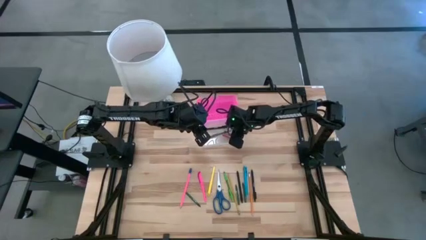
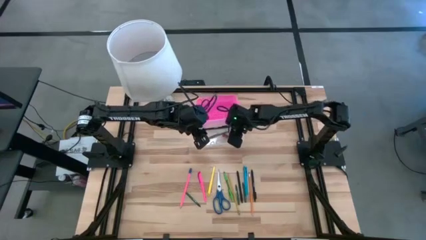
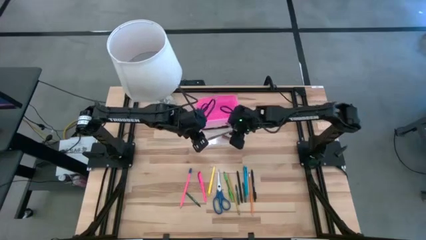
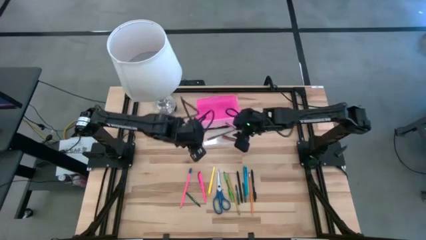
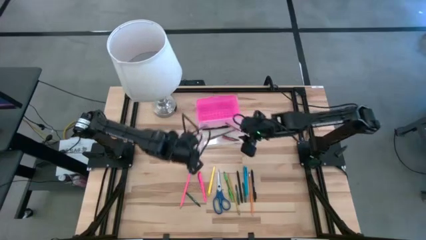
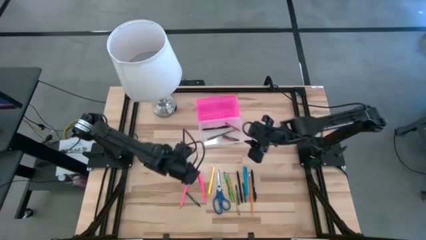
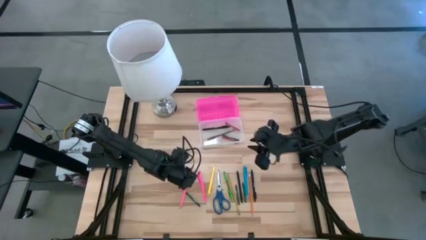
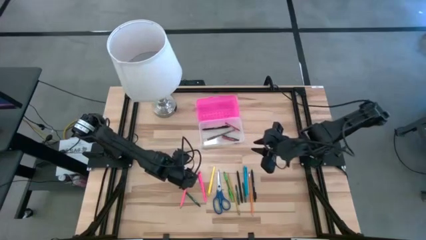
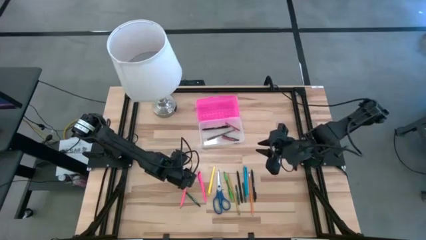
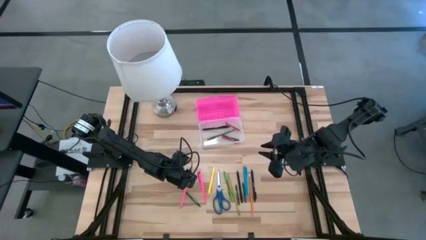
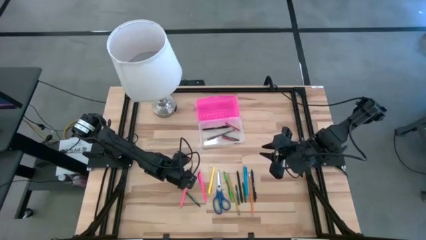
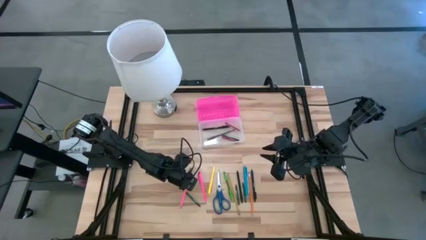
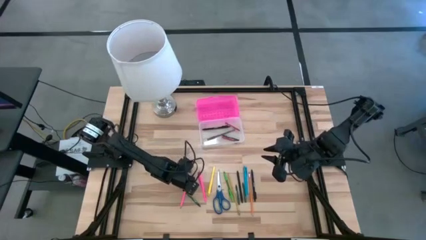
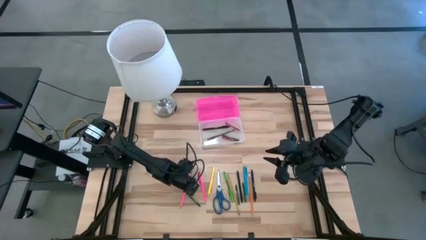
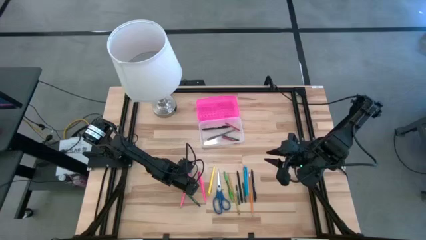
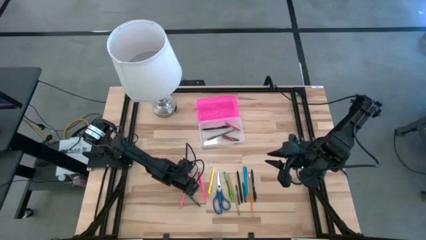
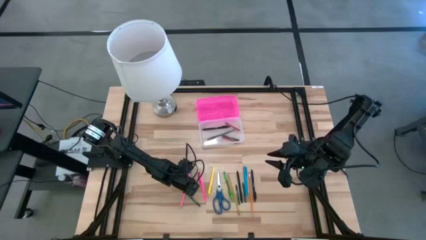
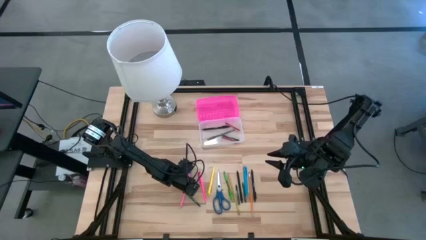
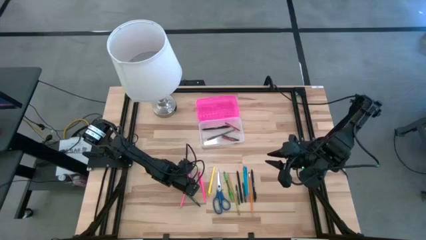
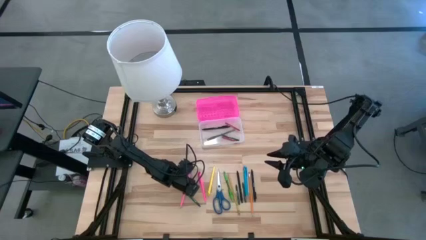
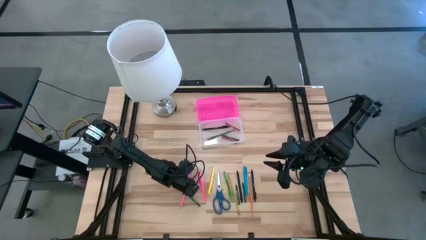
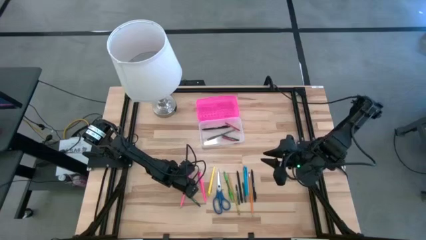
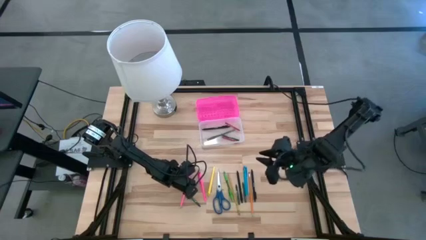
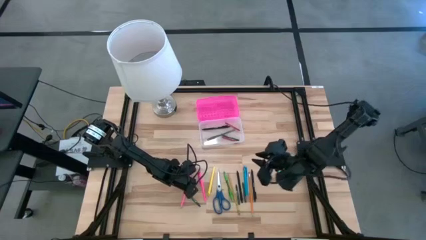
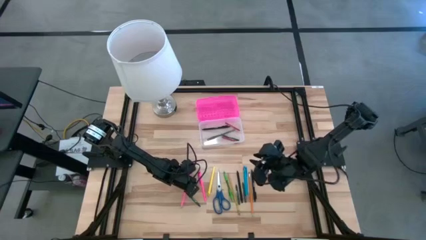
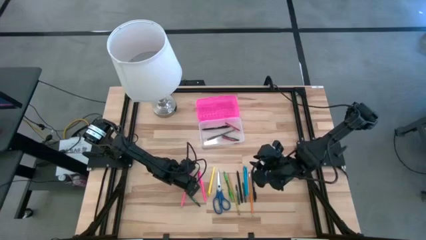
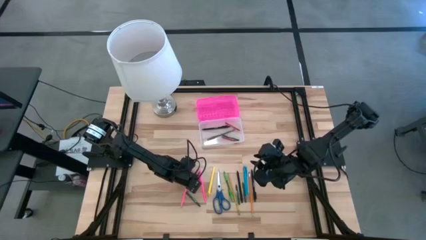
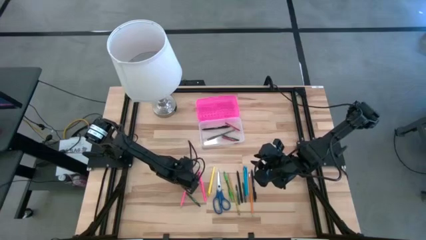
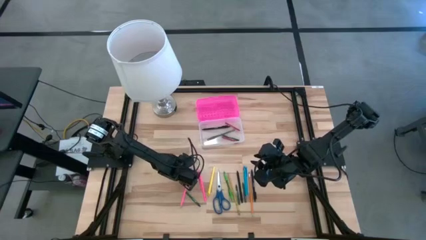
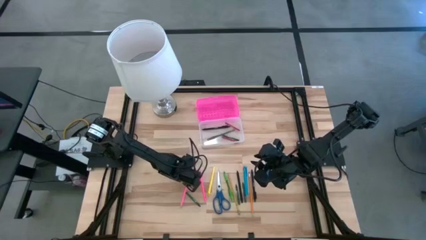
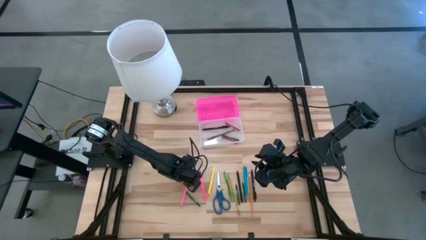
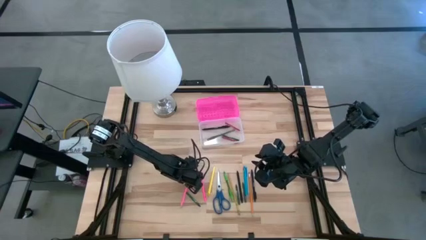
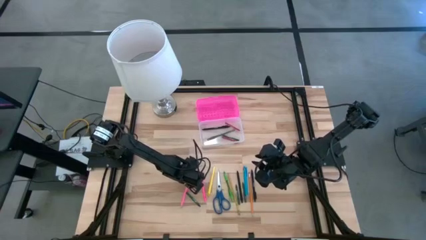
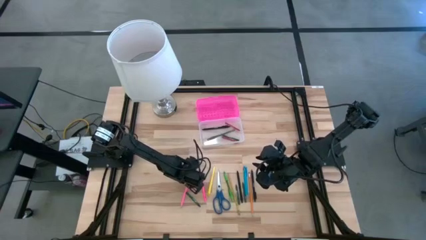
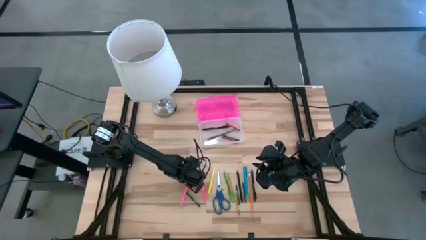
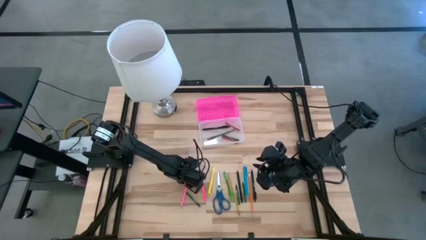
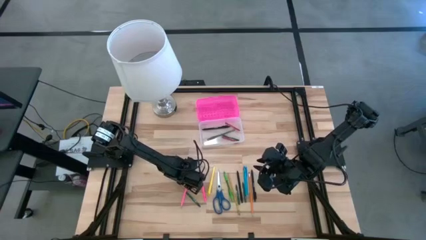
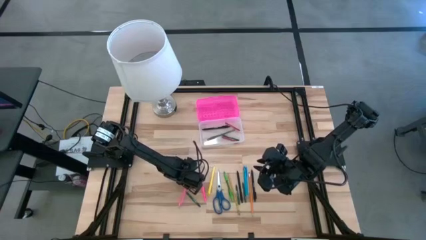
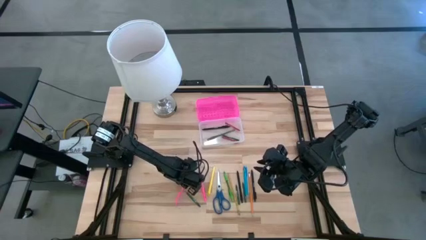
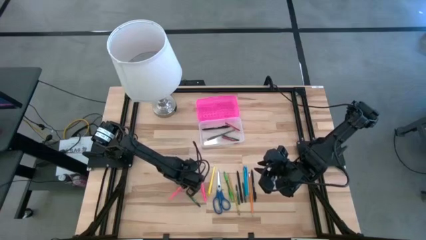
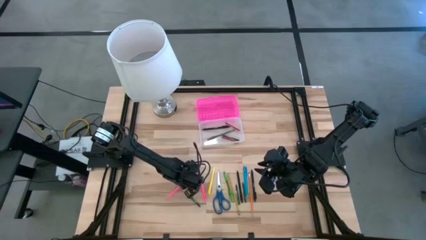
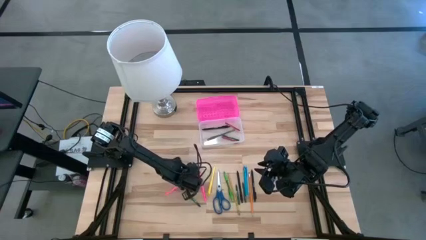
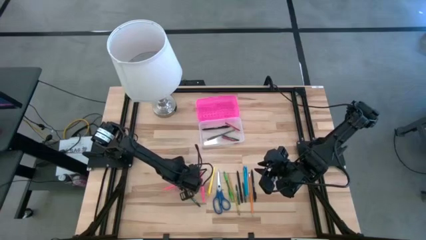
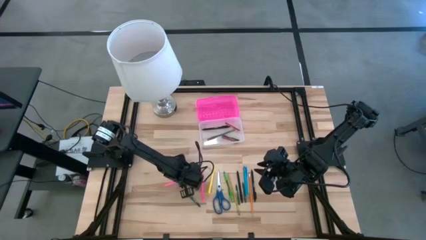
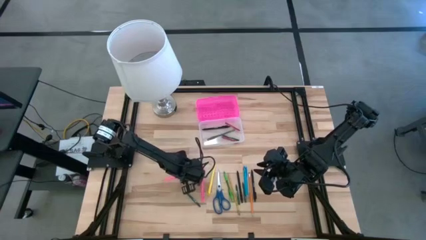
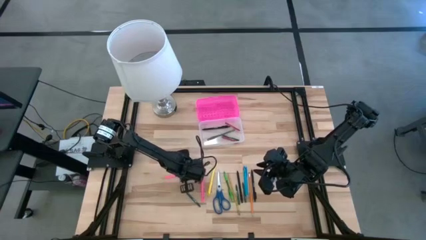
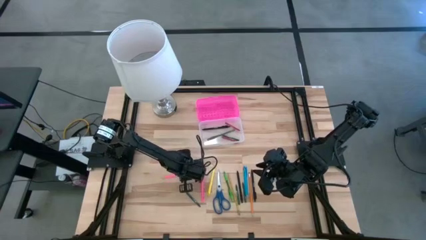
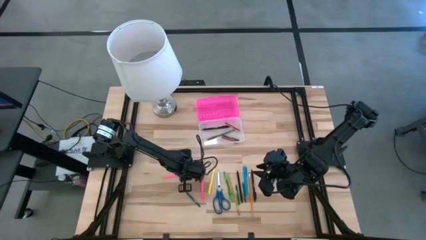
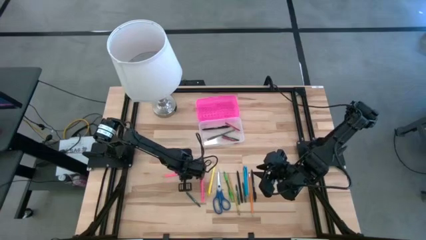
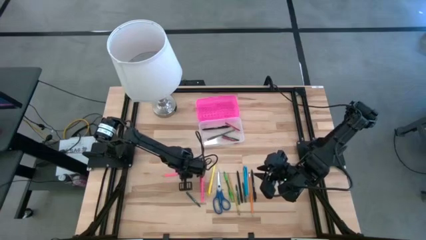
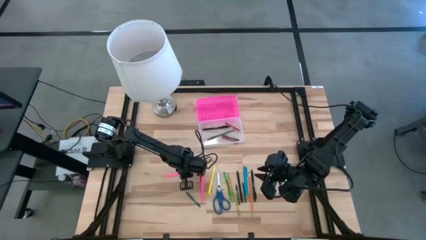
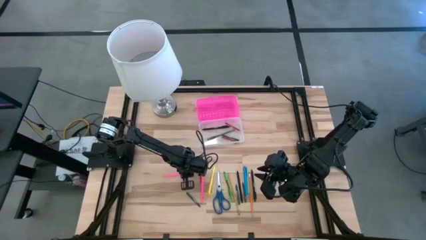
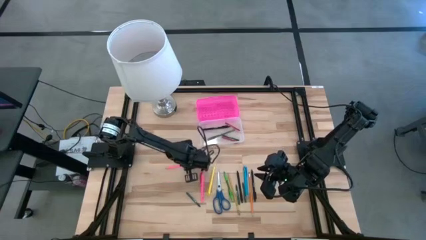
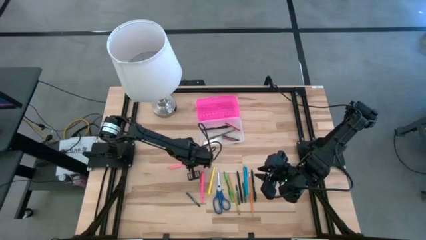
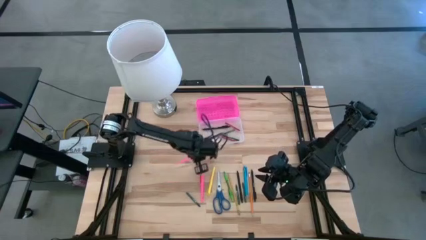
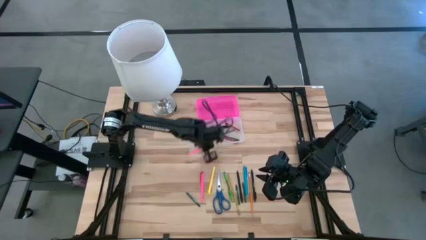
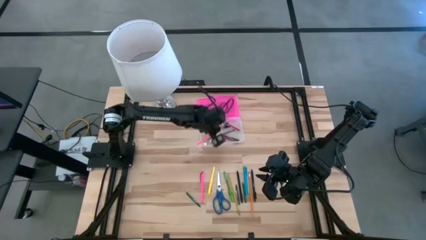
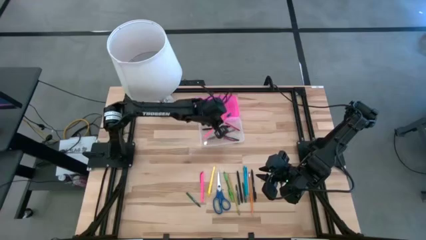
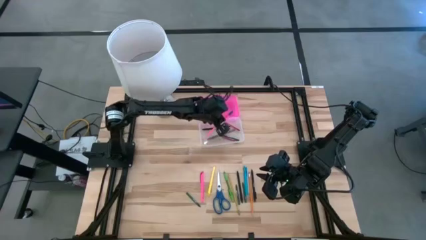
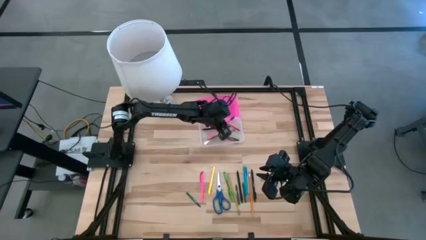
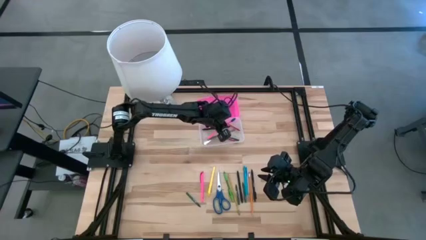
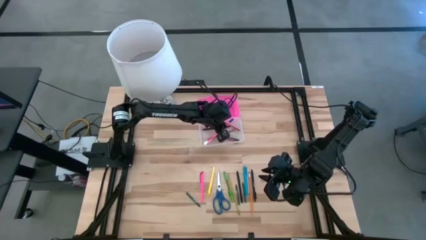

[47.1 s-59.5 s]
Task: Pick & place school supplies into a supply box
Put the pink pencil into the pink supply box
